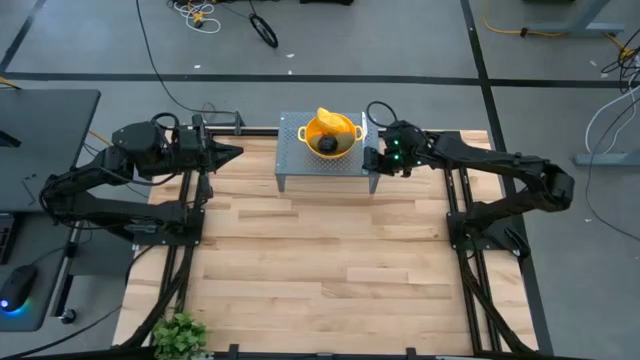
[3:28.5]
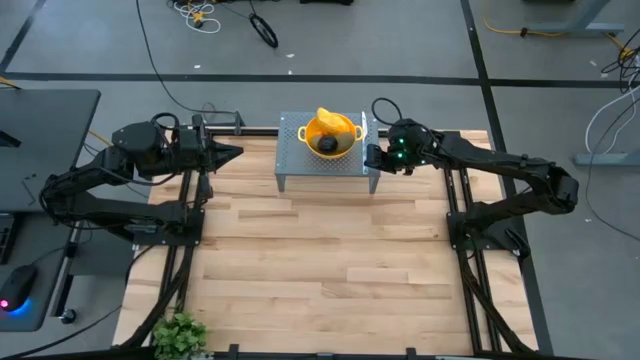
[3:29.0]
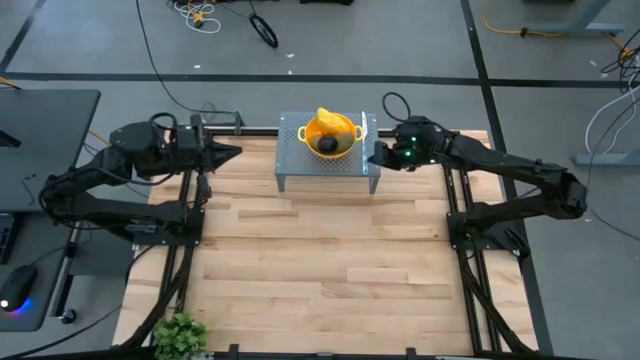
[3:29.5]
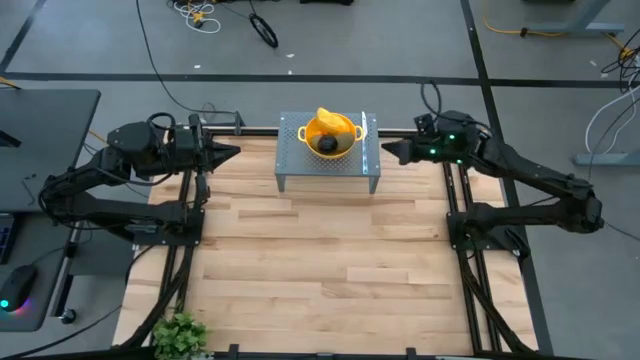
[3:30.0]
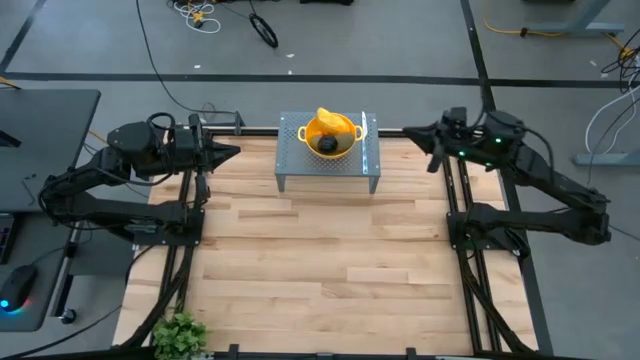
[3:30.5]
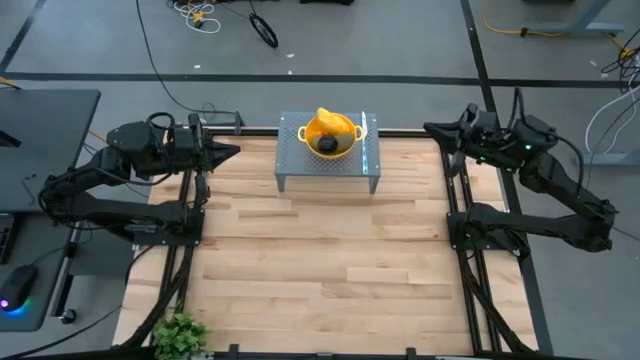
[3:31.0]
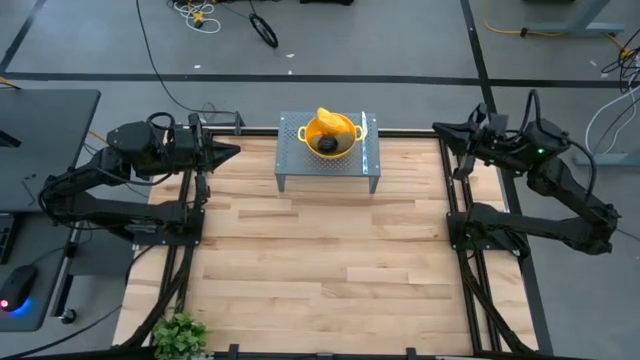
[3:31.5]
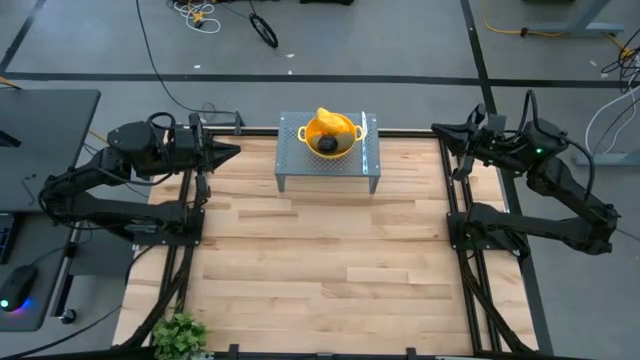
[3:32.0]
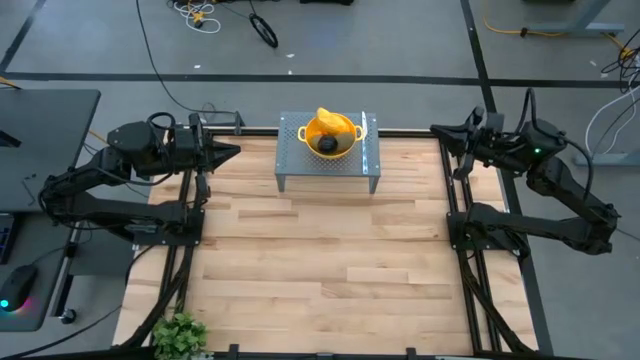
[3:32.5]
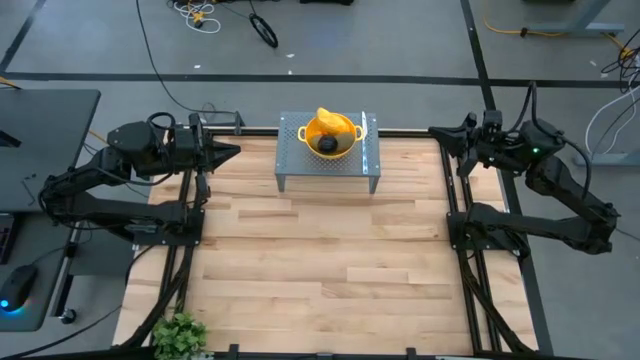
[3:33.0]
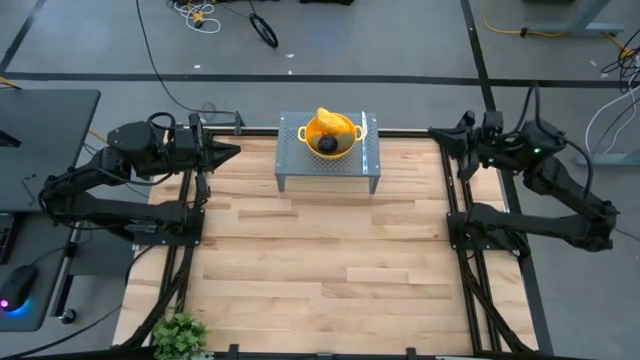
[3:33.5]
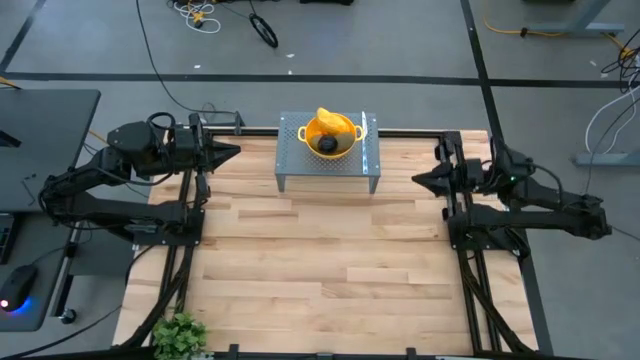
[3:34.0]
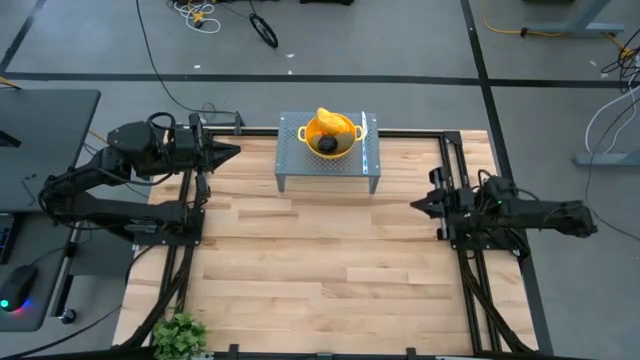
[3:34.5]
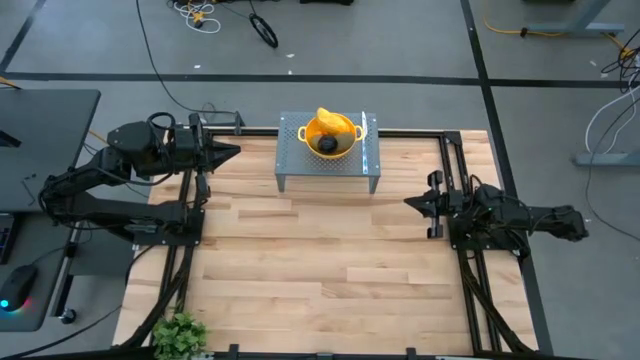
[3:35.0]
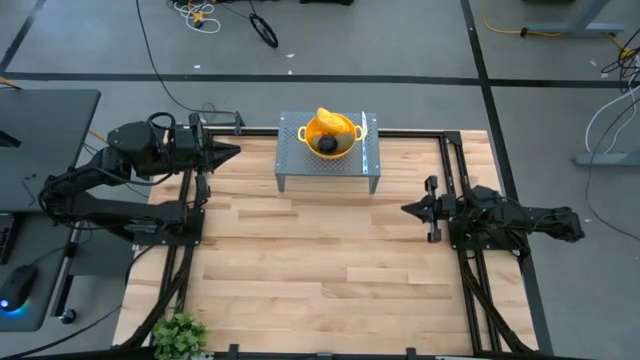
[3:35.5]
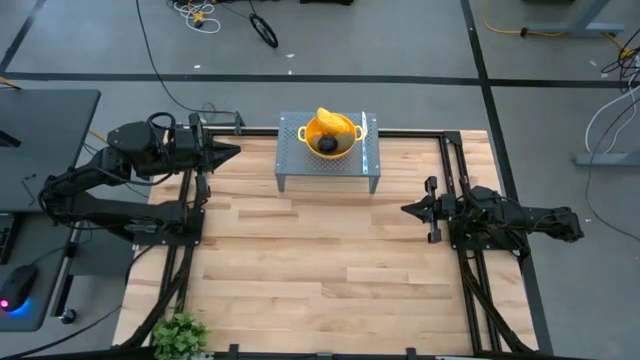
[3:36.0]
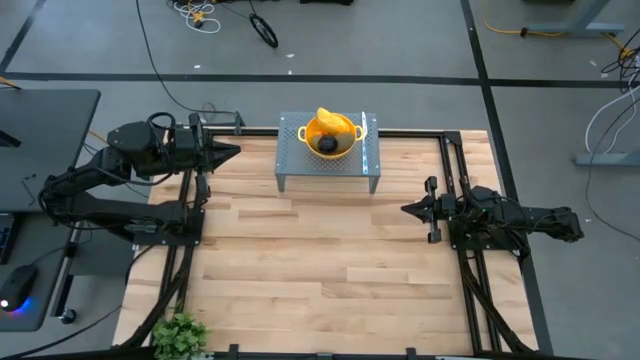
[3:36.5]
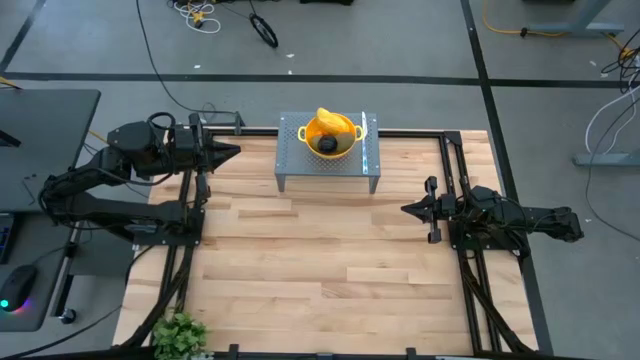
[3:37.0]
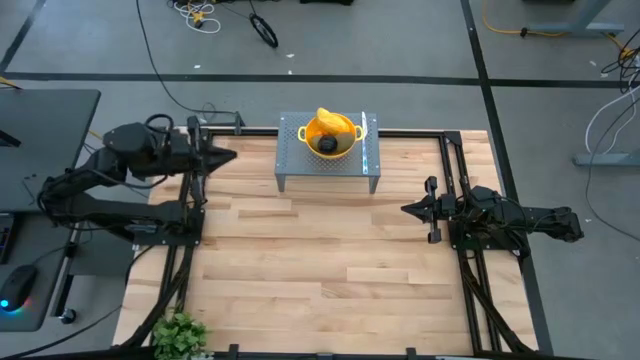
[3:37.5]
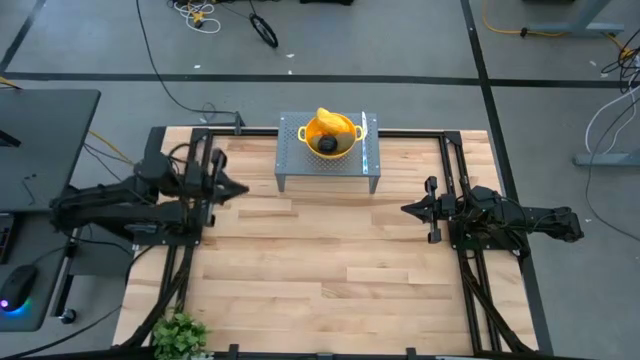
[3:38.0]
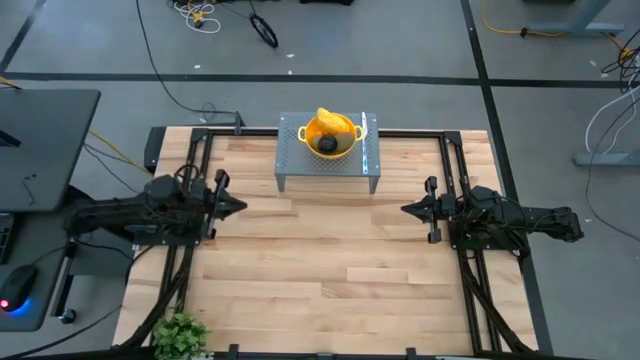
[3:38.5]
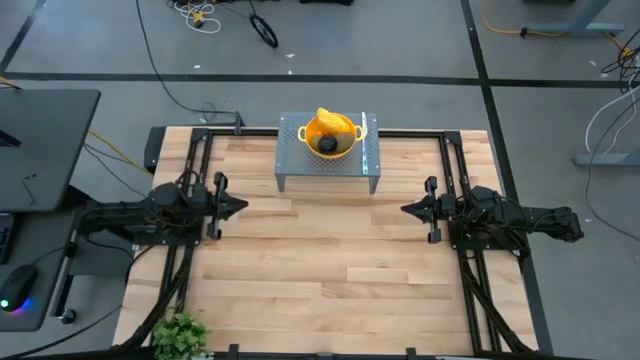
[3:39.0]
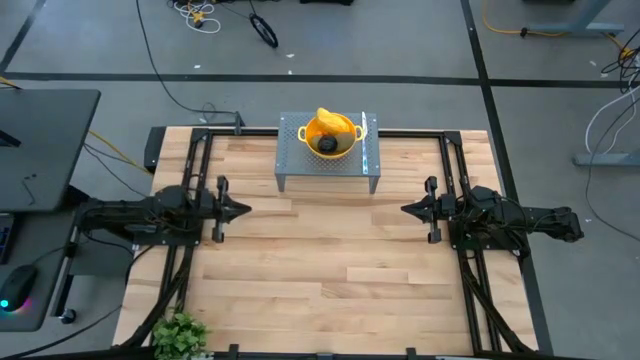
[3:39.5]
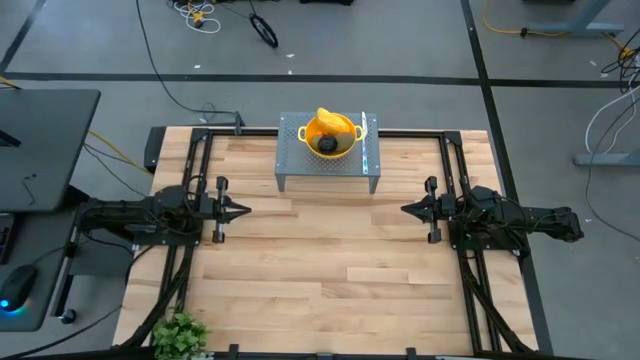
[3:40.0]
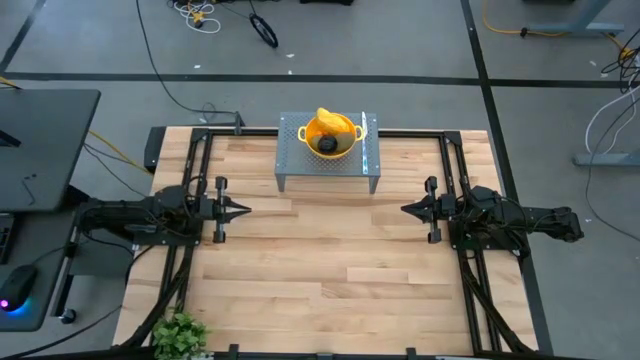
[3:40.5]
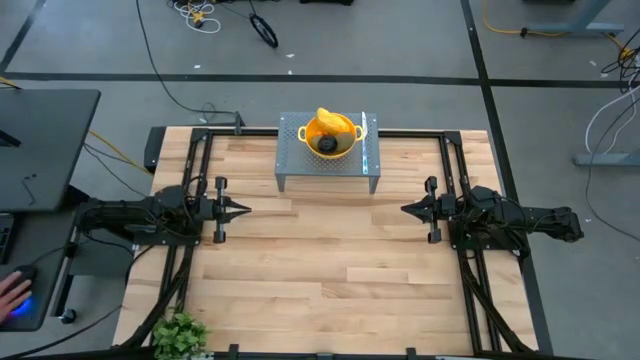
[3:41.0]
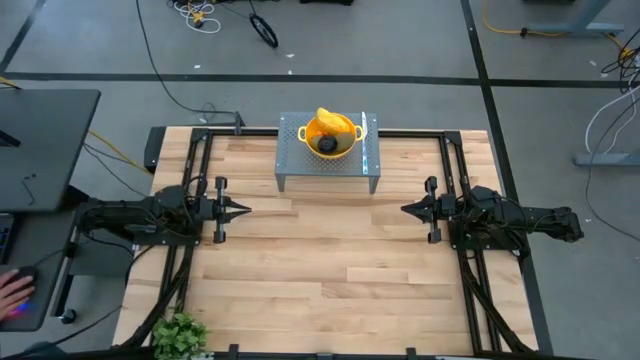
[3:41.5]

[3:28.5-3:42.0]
Task: Pick & Place Fruit
Return to Home Position

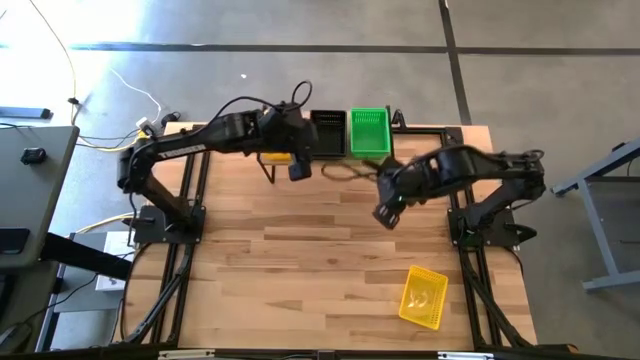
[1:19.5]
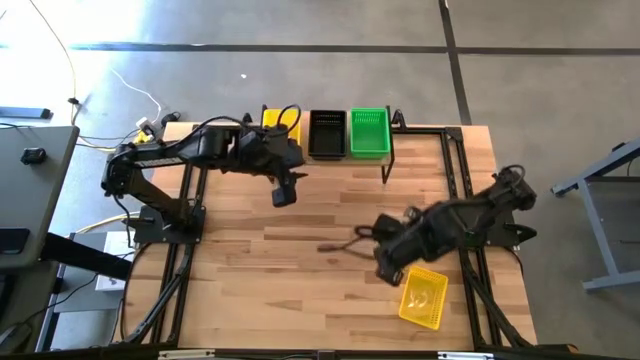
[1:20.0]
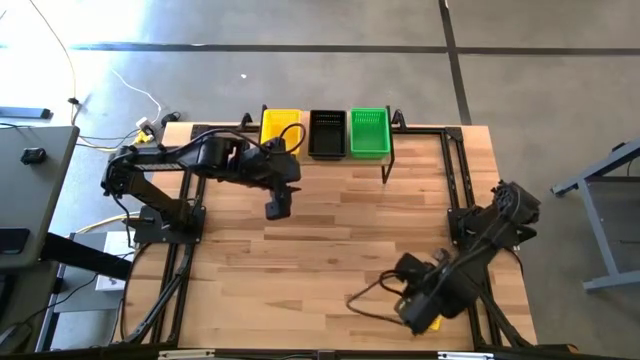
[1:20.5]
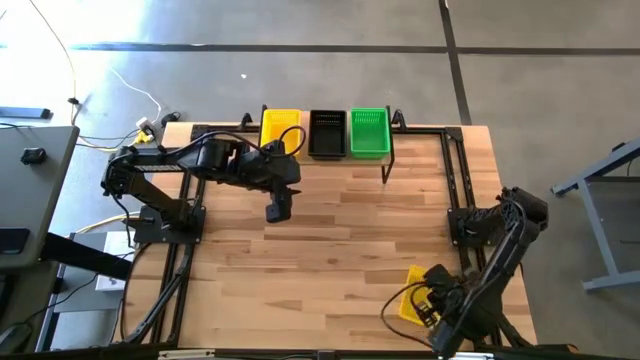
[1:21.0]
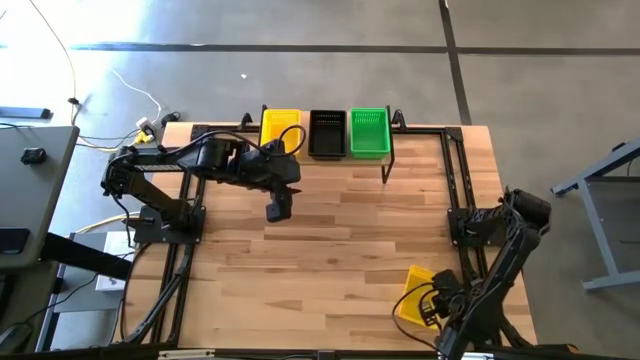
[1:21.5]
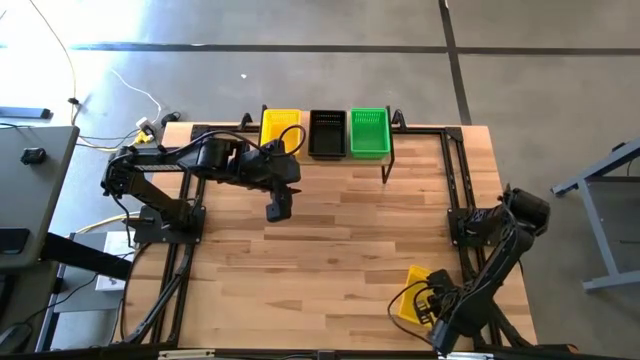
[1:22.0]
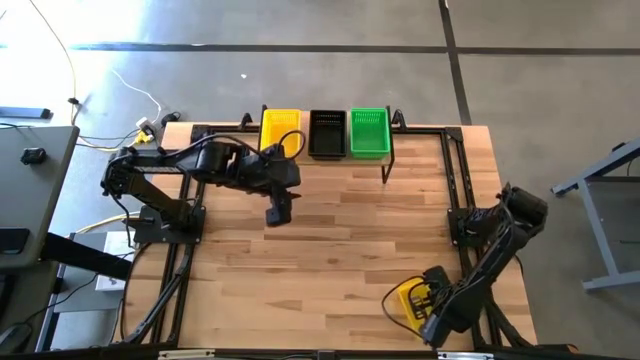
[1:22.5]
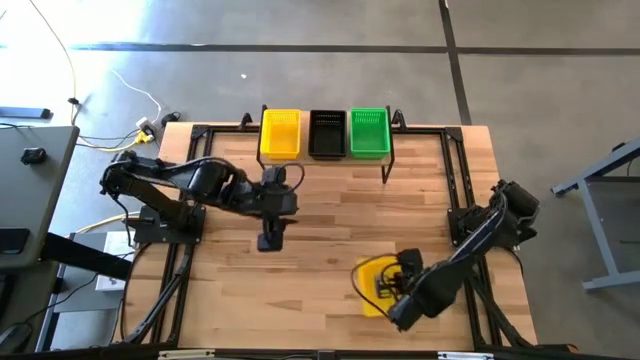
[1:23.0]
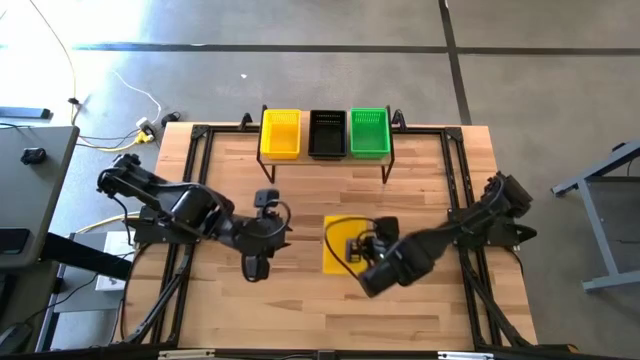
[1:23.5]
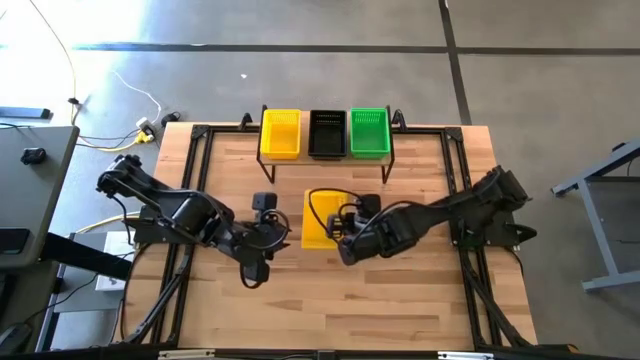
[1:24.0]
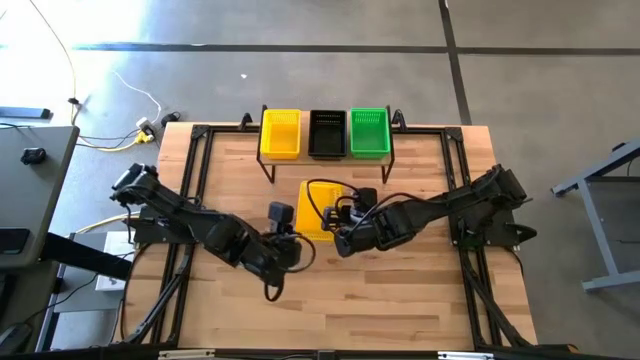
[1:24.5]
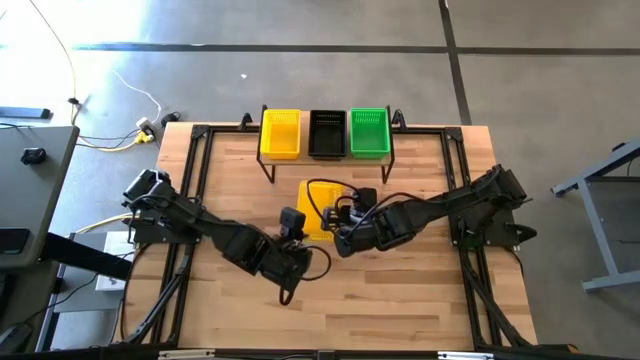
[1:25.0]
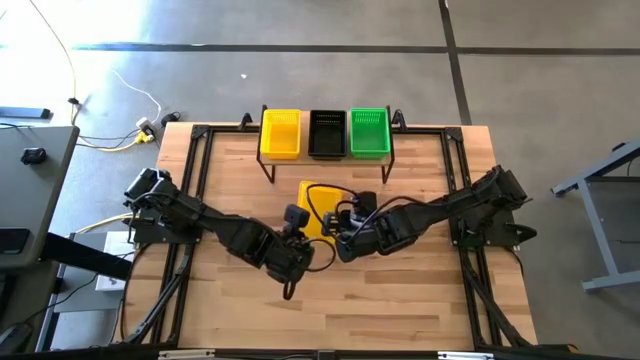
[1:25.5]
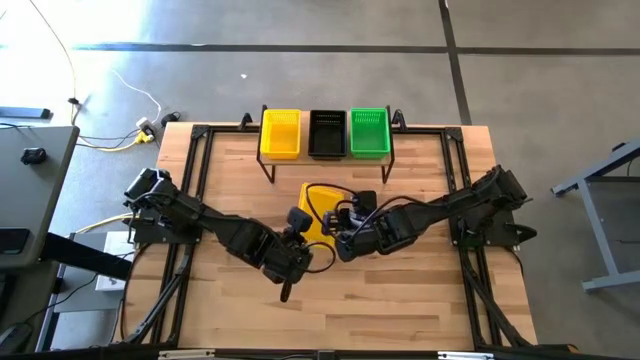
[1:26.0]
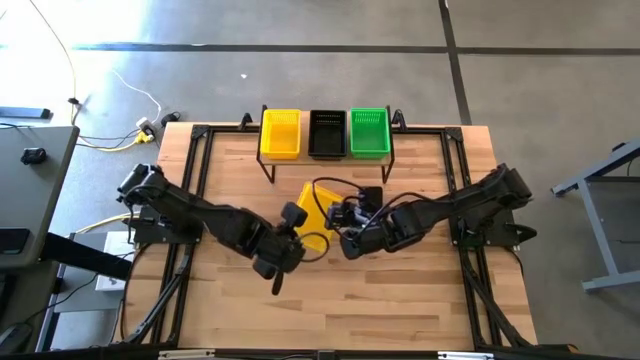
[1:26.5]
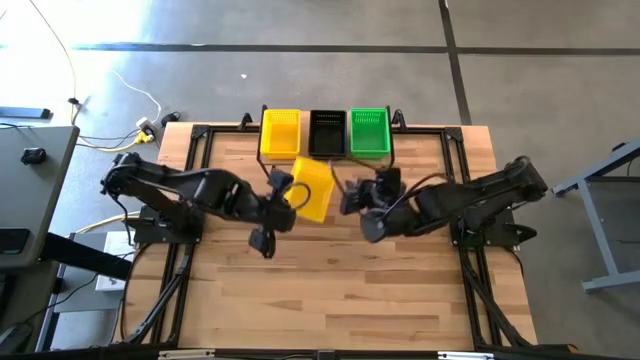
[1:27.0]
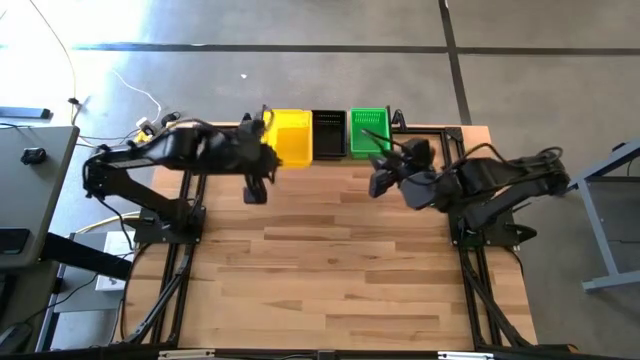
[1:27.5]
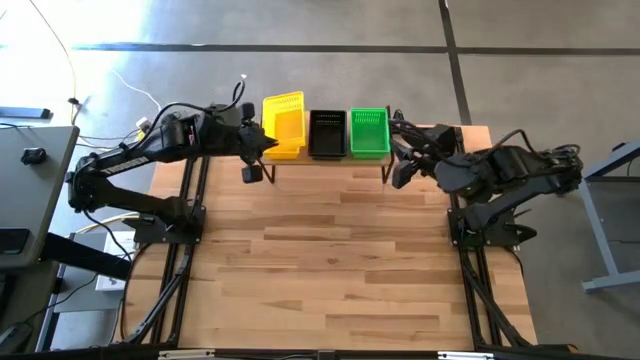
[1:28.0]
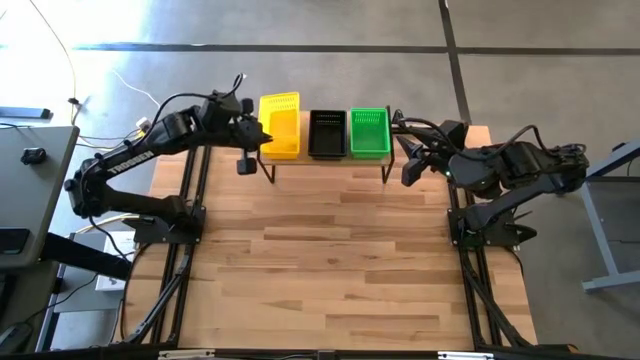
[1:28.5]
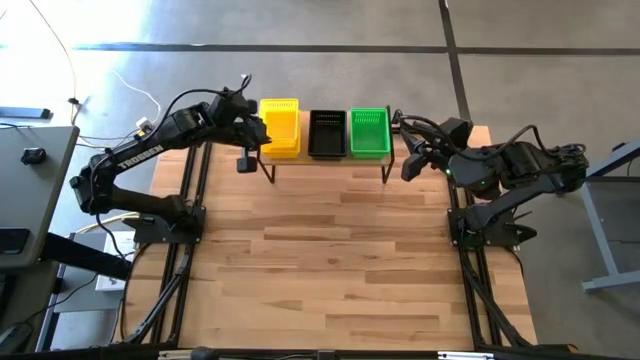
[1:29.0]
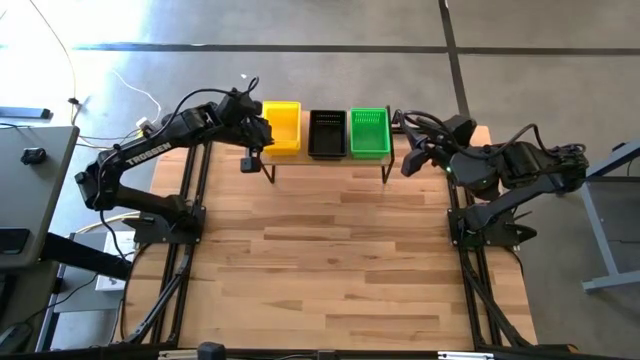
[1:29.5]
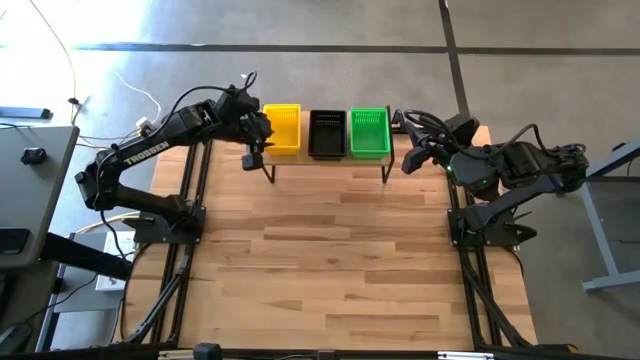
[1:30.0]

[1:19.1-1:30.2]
Task: Stack baskets on shelf by color
Stack the yellow bin on the other stacked yellow bins on the shelf
